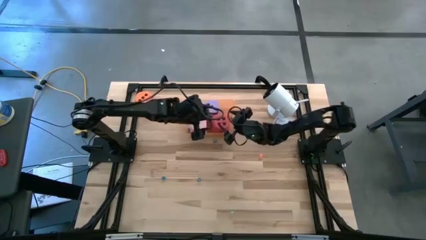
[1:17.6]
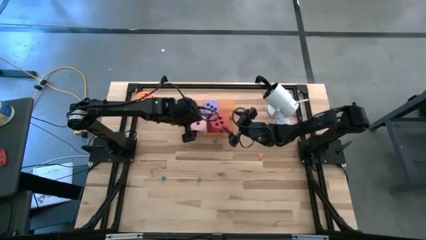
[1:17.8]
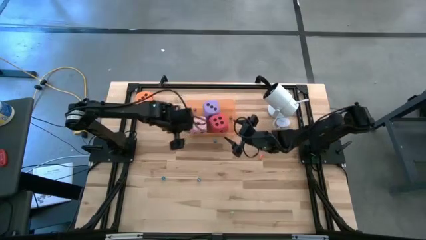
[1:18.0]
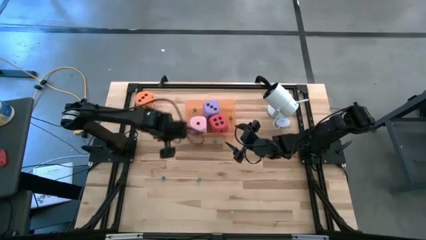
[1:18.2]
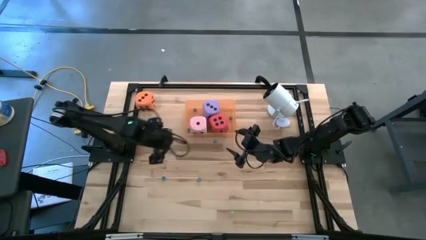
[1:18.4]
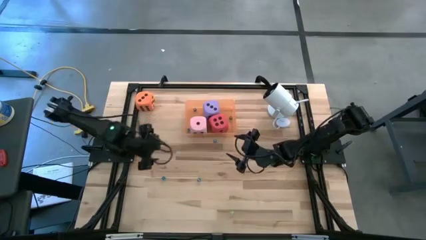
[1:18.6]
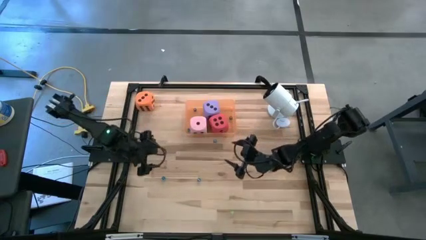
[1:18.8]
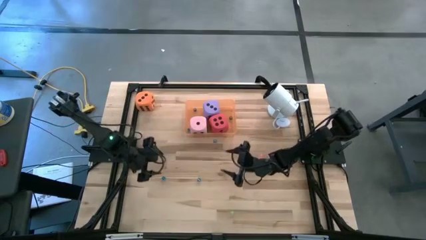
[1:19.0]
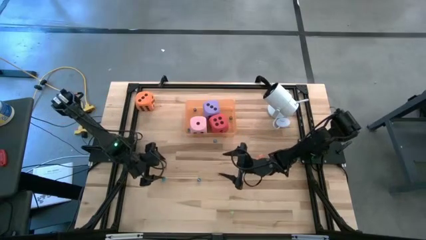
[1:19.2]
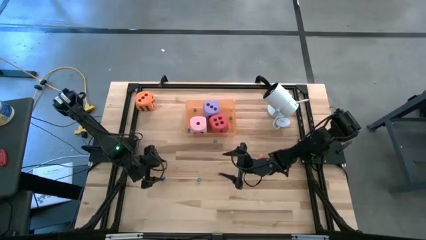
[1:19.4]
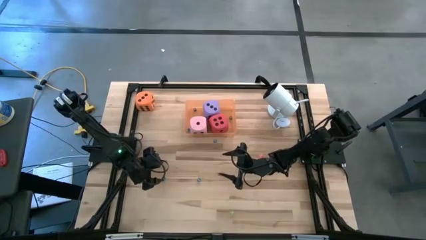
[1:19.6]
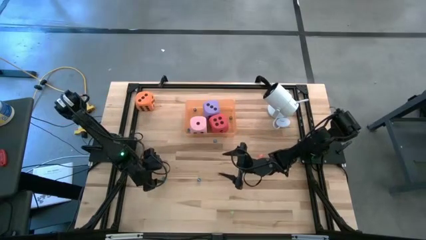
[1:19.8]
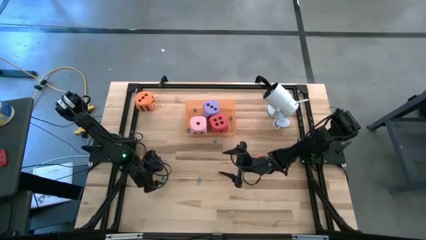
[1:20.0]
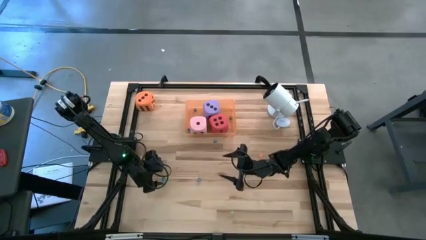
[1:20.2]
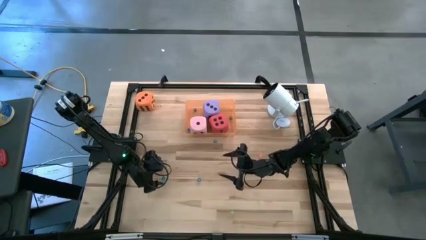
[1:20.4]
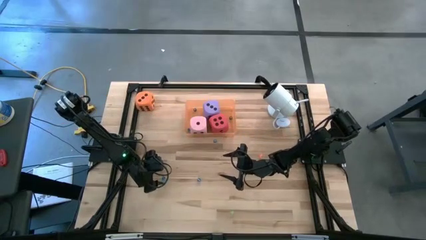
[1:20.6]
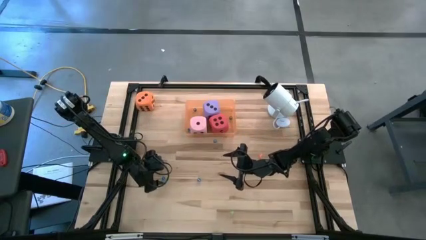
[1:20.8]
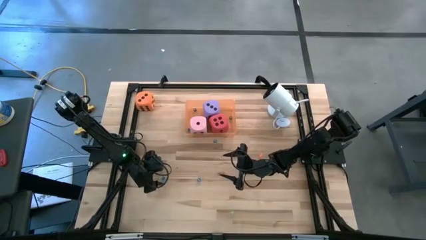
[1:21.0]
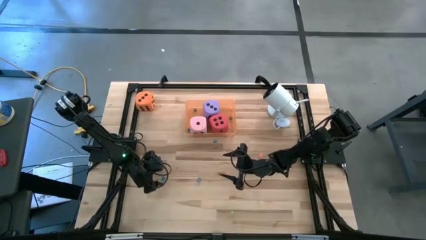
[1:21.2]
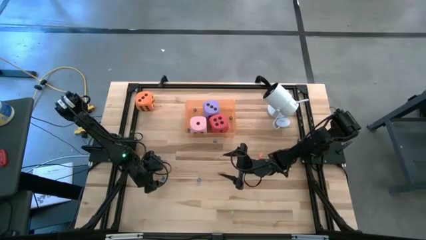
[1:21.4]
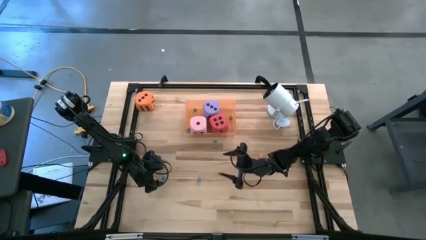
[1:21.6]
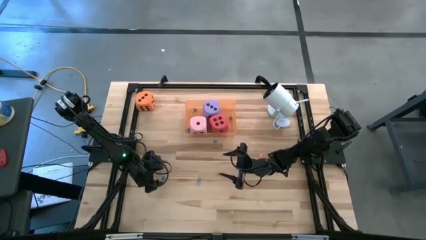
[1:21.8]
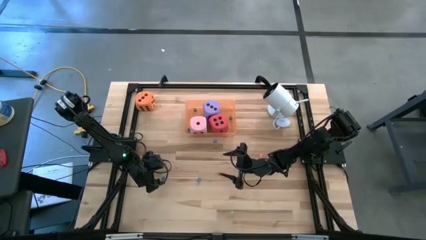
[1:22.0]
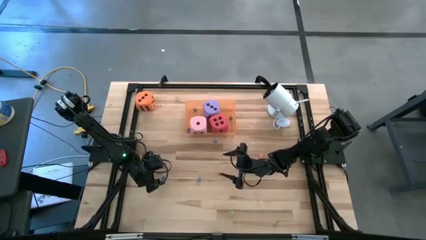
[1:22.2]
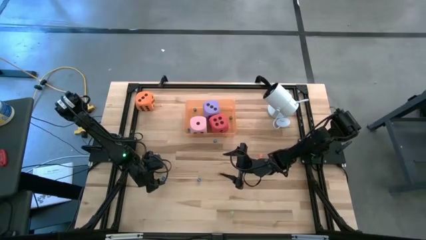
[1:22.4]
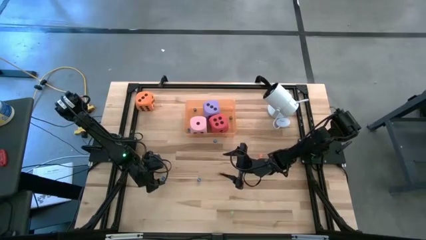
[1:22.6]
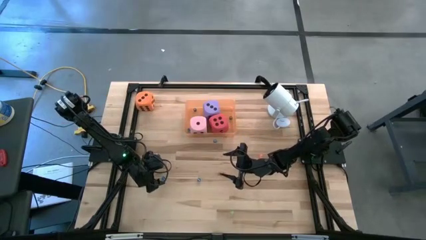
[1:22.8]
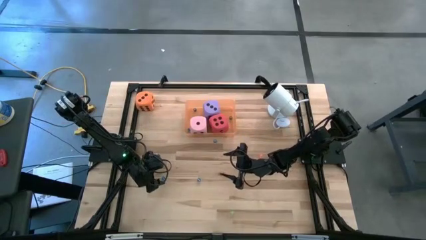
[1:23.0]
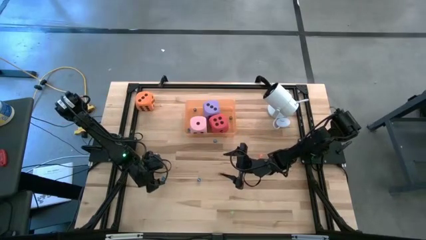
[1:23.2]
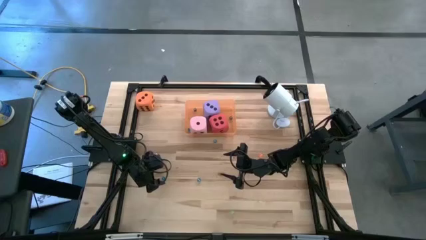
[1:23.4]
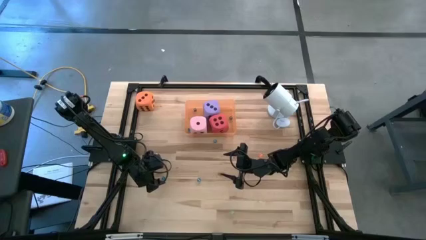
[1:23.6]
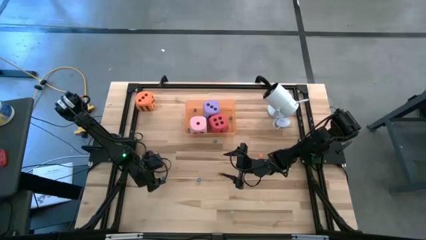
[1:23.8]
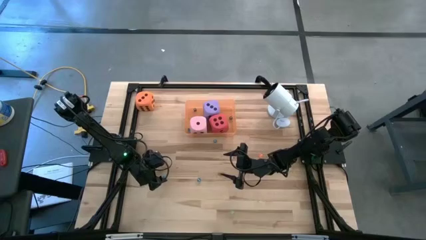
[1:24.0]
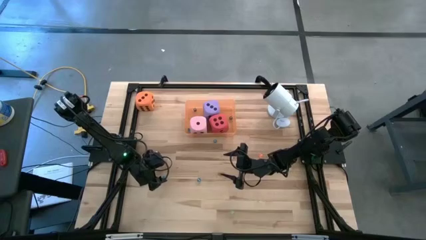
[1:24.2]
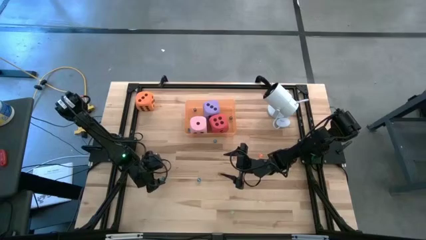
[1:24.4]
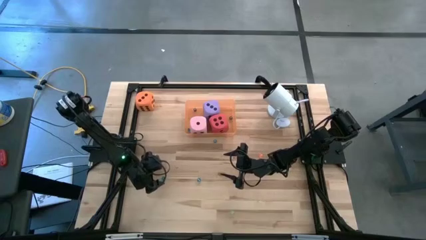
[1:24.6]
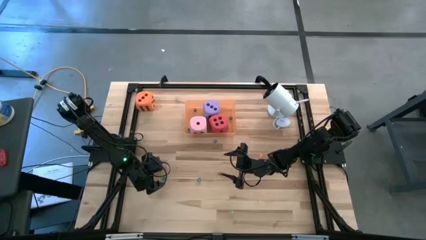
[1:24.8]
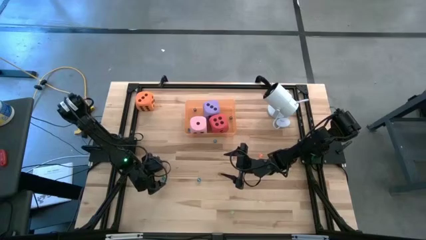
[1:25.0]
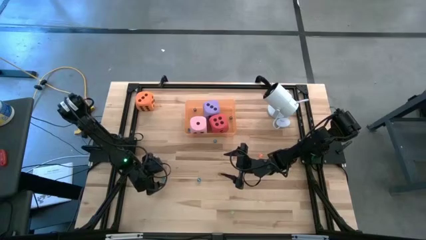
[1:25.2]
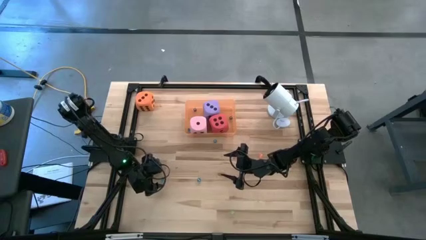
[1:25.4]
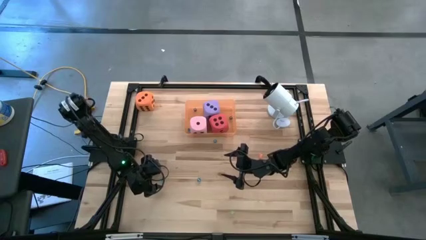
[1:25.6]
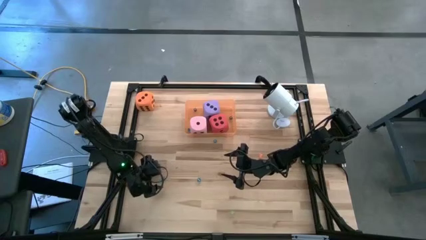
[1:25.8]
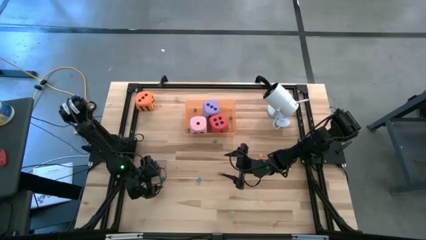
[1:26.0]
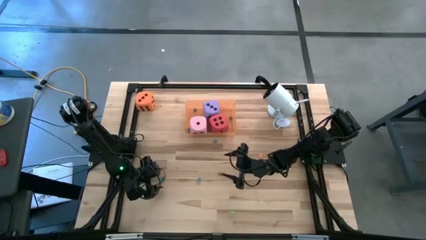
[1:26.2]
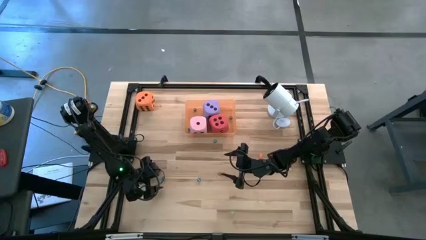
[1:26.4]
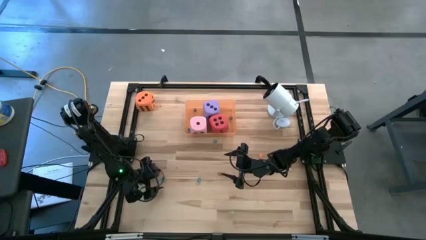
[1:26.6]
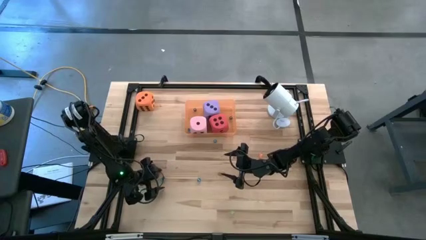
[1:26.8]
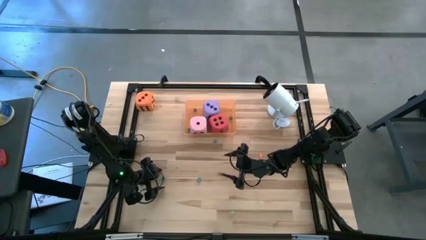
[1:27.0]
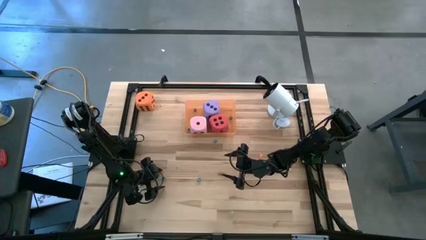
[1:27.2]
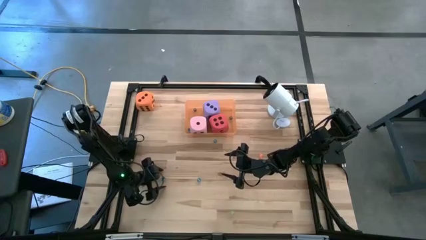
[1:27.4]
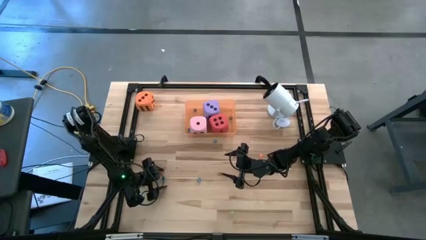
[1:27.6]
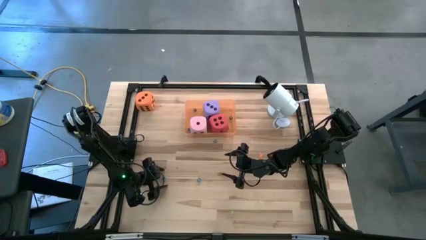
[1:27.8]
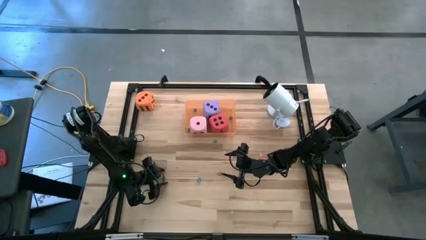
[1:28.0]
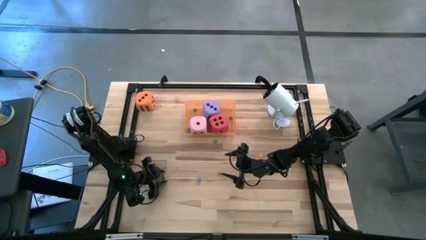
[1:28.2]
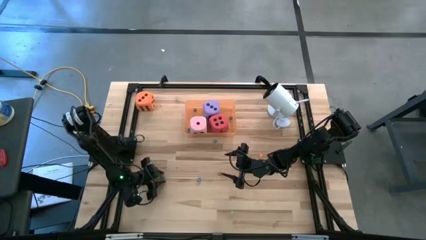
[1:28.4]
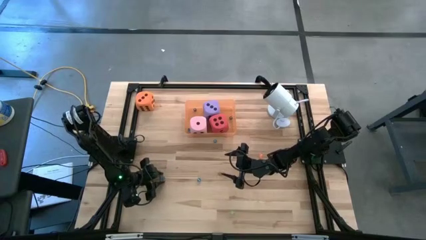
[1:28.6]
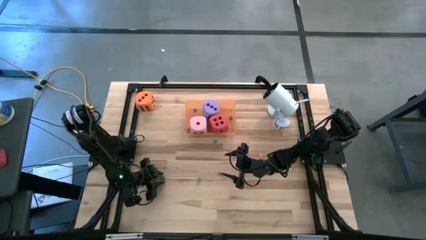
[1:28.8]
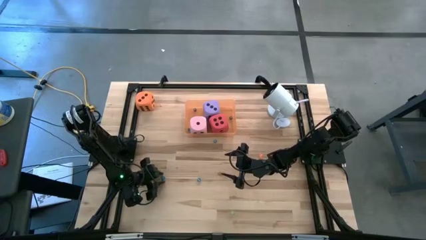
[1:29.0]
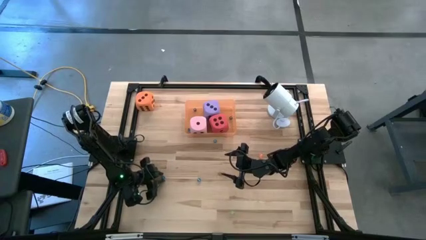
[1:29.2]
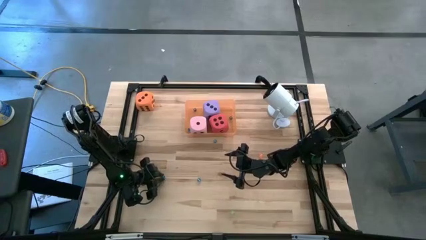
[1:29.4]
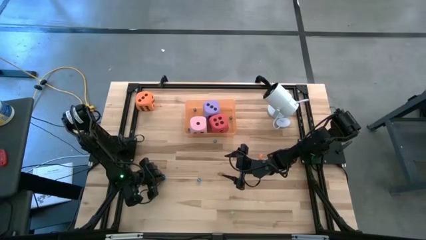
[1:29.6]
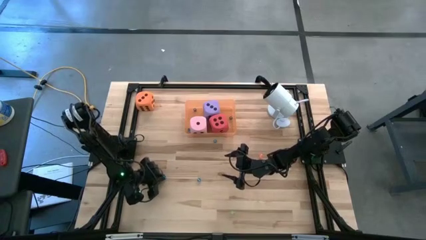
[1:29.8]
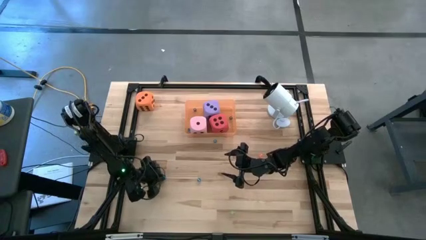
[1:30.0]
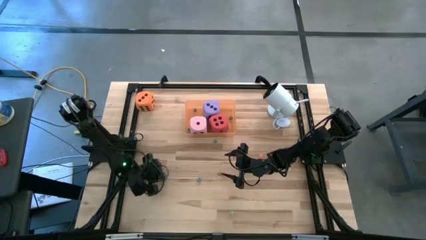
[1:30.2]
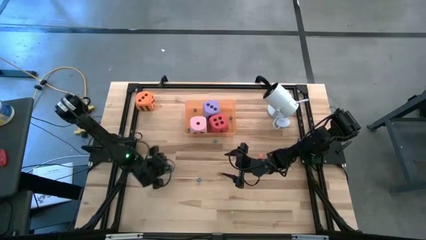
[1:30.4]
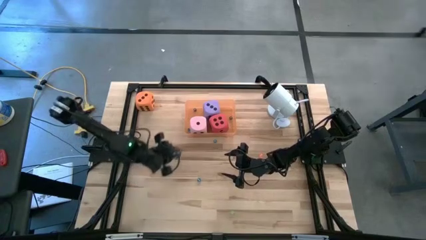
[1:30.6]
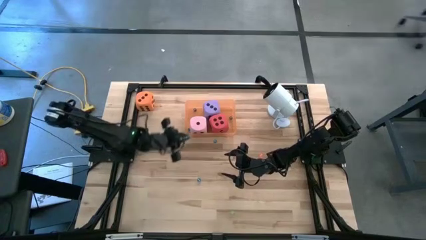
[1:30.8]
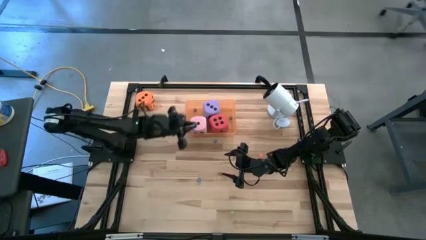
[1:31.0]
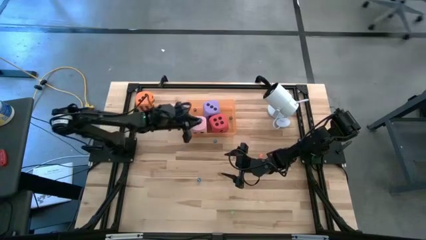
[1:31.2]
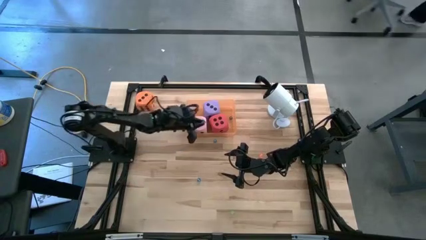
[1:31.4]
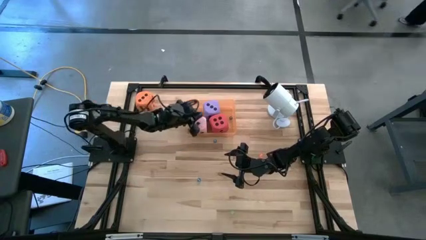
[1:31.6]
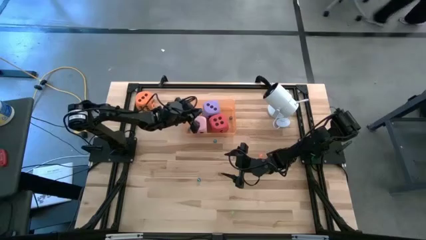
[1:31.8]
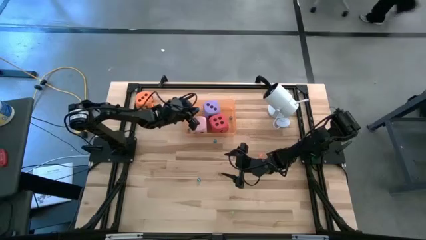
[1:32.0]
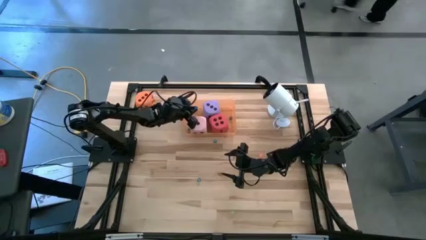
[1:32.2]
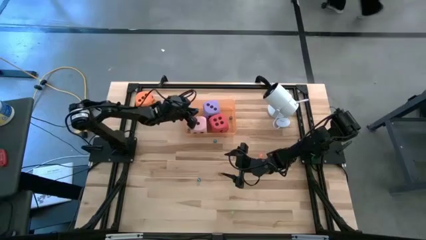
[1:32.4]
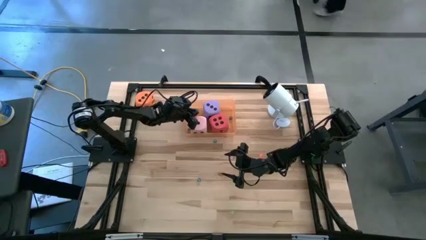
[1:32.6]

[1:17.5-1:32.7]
Task: Pick & Place Dice
Put the small light blue dice in the orange bin

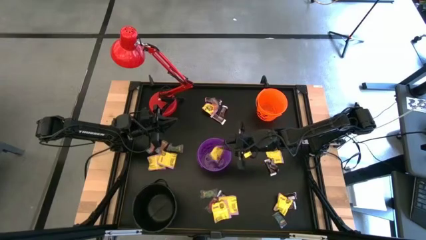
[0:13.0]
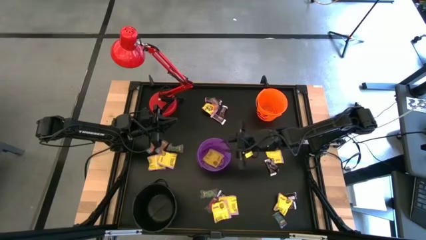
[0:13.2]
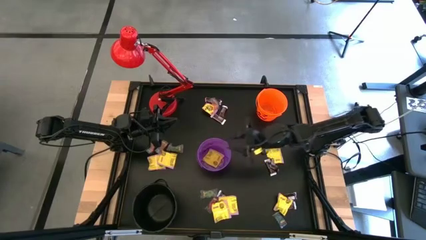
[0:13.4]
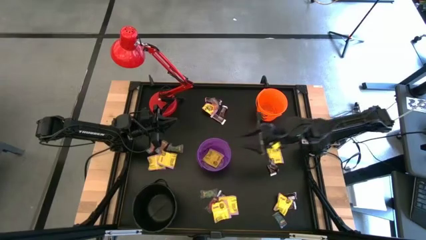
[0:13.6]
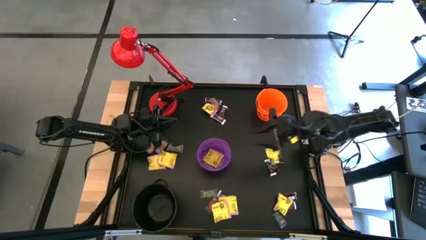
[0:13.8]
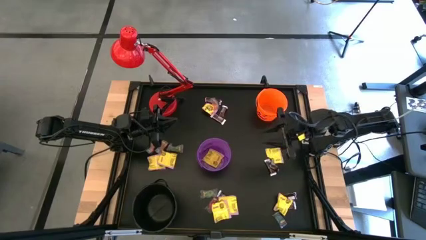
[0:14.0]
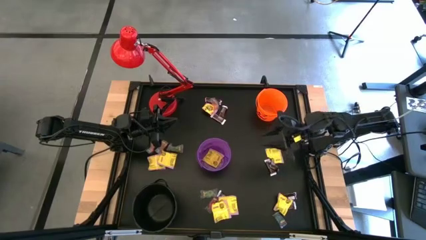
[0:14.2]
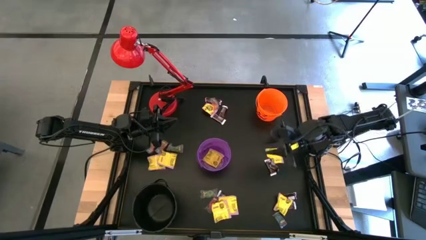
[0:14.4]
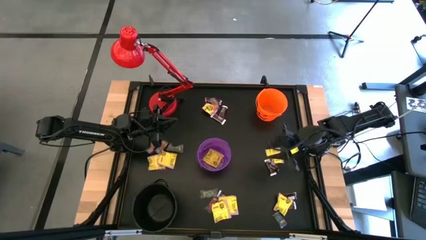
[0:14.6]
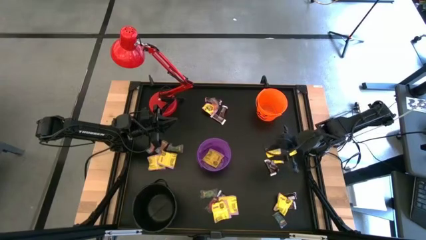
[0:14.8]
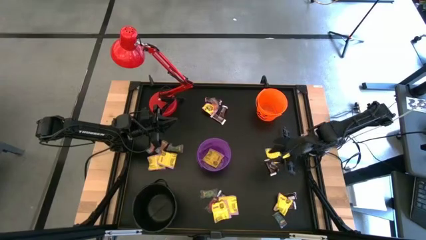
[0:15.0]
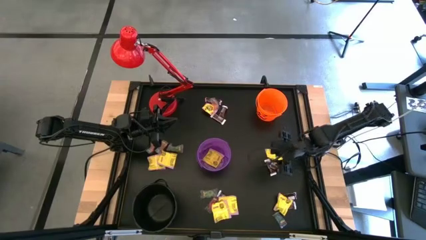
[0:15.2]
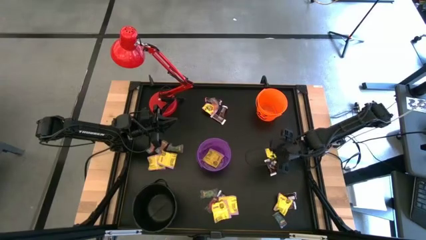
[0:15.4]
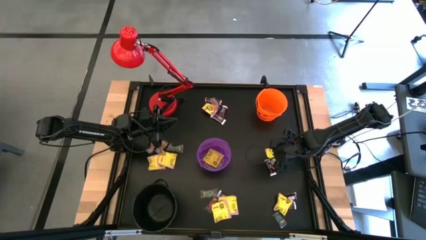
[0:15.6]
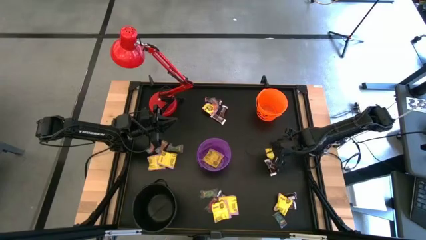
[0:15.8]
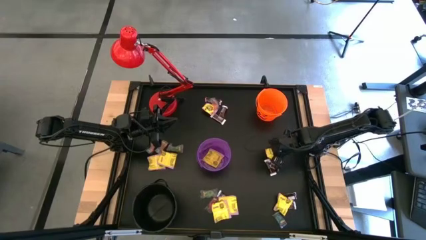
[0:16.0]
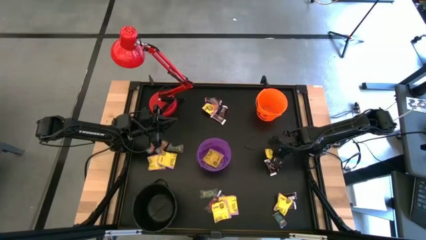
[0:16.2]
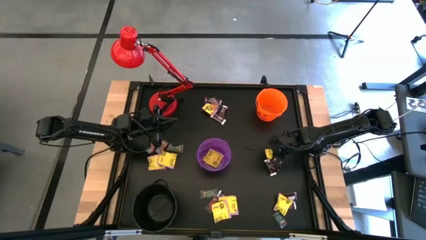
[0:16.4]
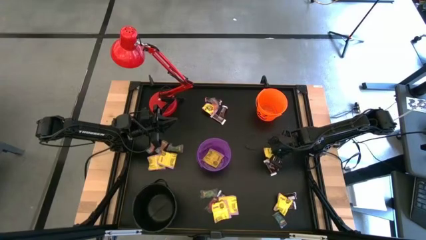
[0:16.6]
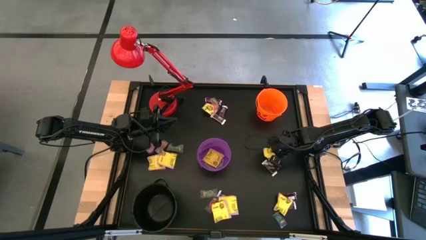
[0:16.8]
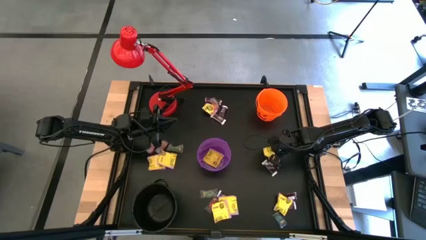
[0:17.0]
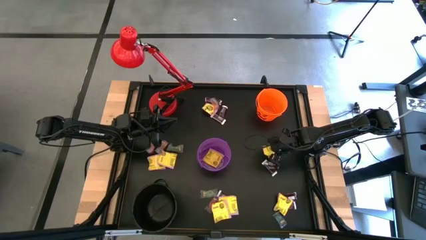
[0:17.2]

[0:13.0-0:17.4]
Task: Sort candy
Put the yellow candy into the purple bucket
